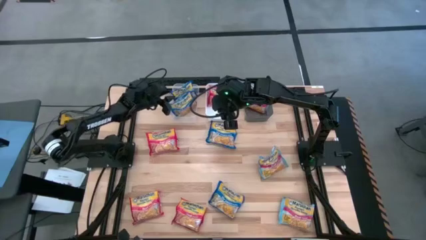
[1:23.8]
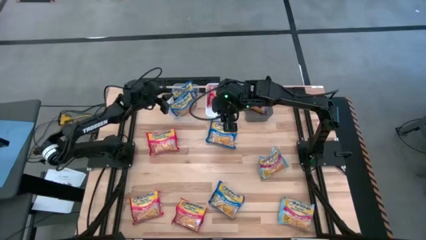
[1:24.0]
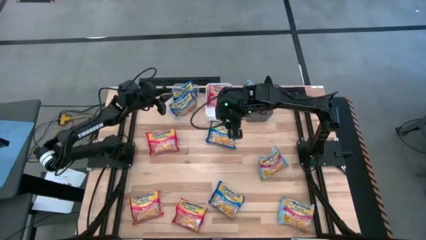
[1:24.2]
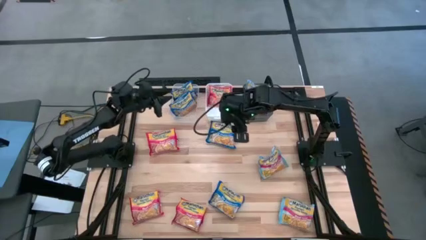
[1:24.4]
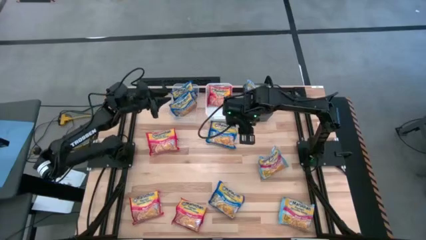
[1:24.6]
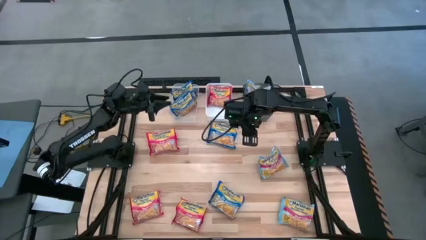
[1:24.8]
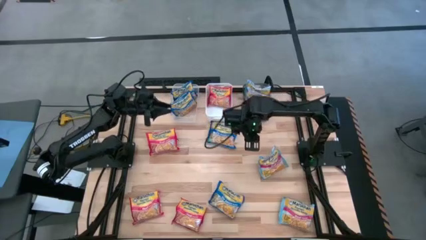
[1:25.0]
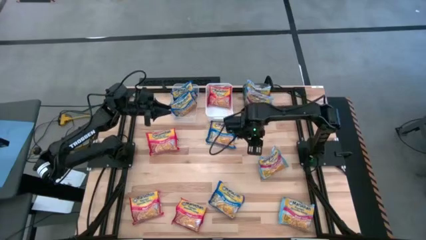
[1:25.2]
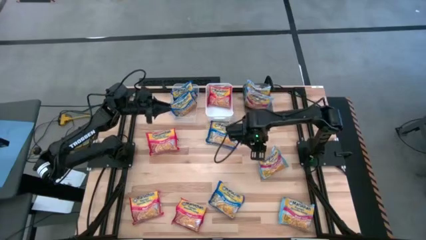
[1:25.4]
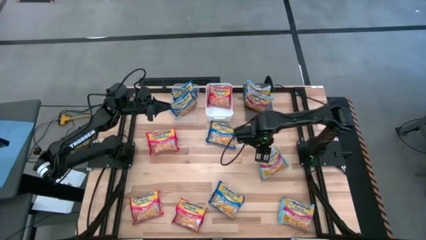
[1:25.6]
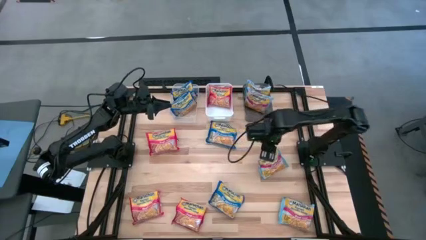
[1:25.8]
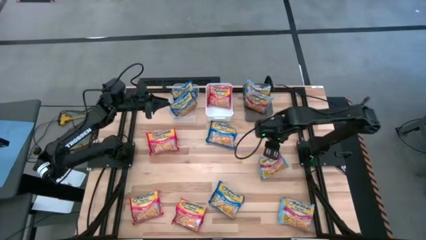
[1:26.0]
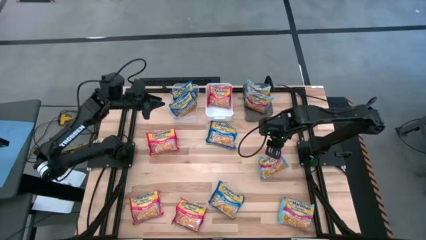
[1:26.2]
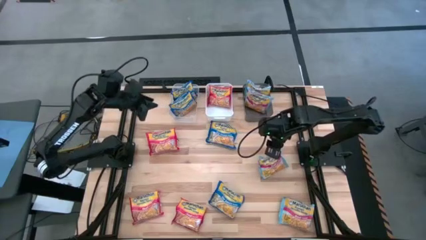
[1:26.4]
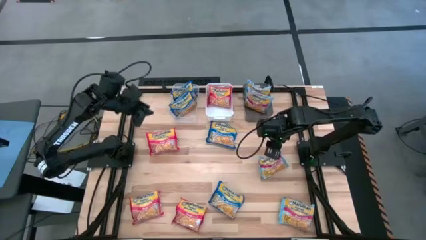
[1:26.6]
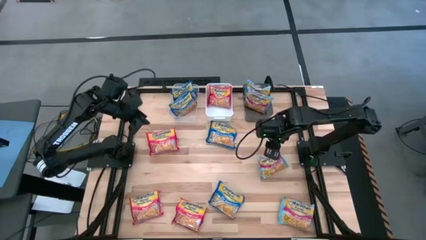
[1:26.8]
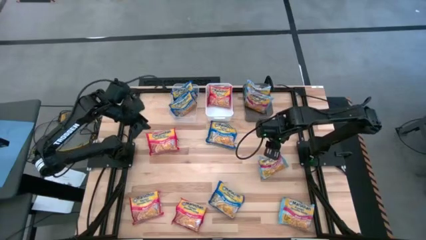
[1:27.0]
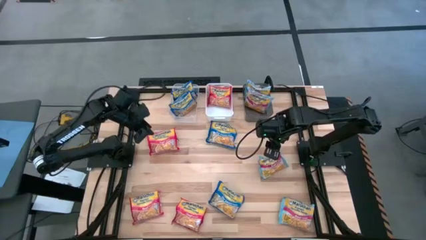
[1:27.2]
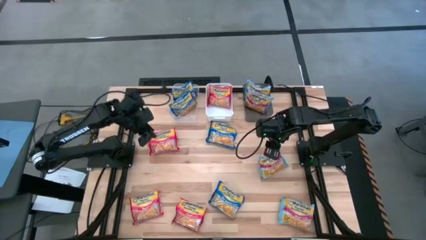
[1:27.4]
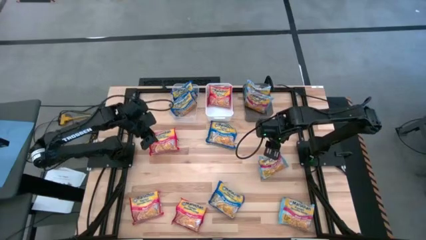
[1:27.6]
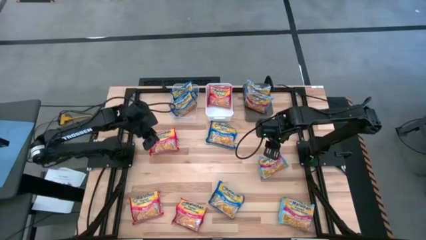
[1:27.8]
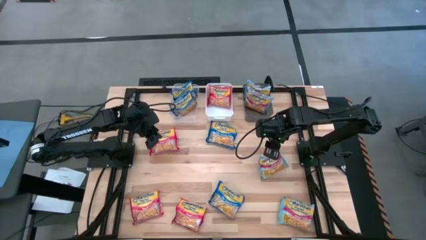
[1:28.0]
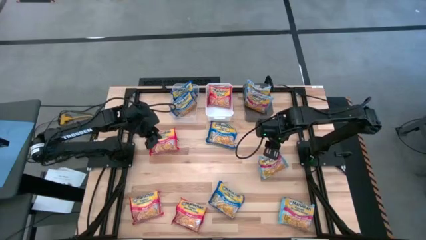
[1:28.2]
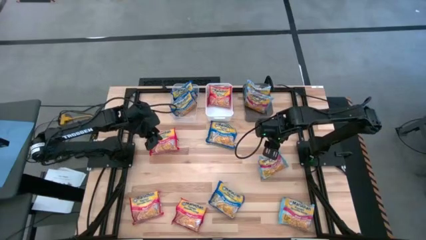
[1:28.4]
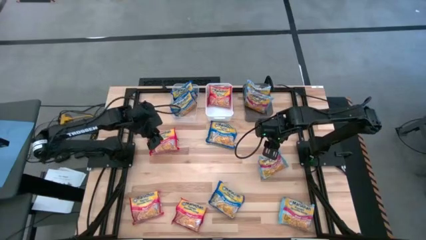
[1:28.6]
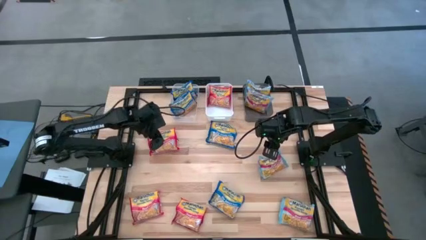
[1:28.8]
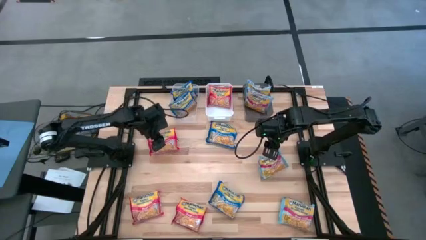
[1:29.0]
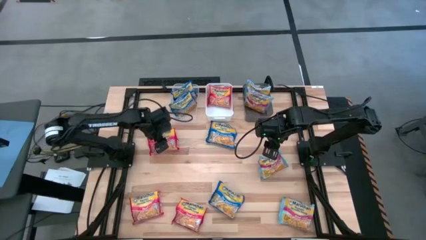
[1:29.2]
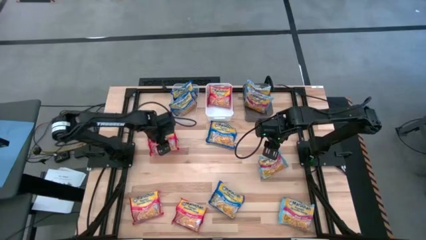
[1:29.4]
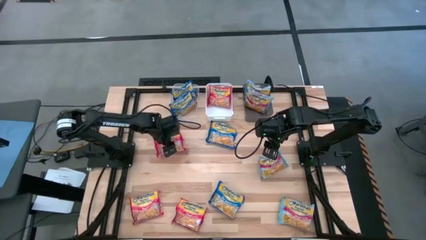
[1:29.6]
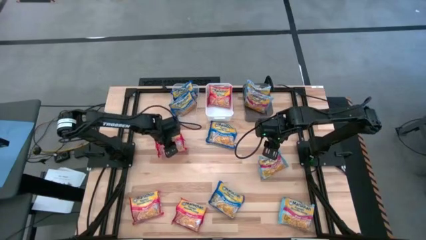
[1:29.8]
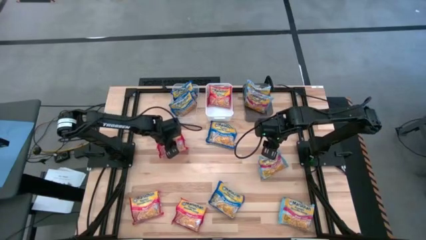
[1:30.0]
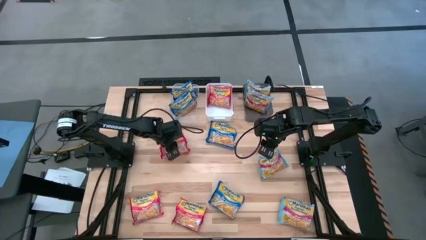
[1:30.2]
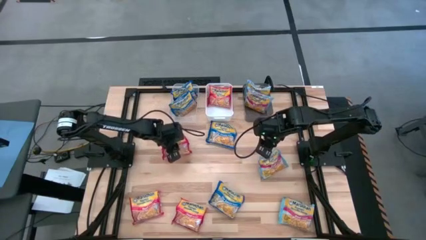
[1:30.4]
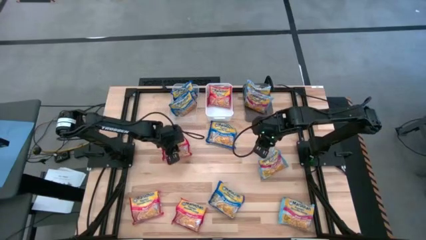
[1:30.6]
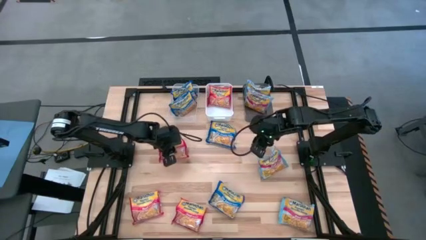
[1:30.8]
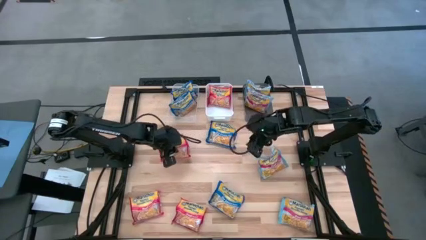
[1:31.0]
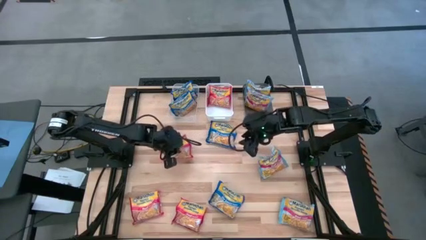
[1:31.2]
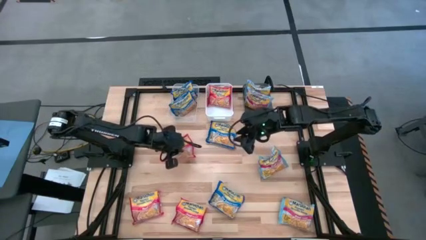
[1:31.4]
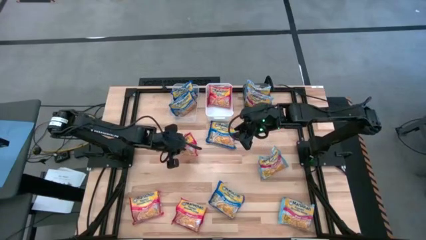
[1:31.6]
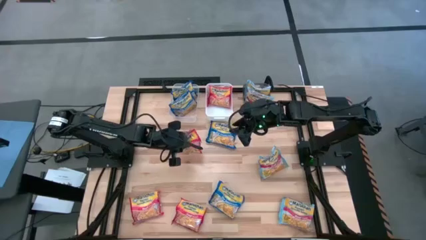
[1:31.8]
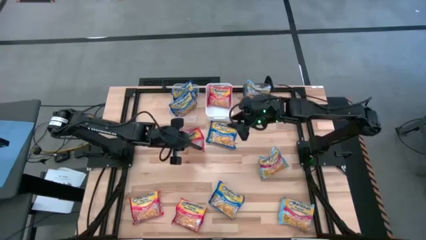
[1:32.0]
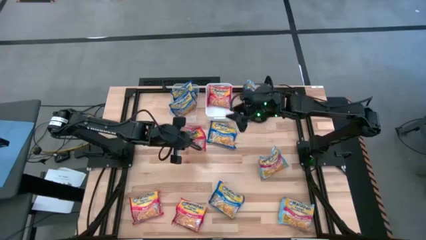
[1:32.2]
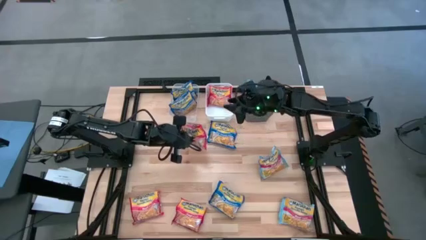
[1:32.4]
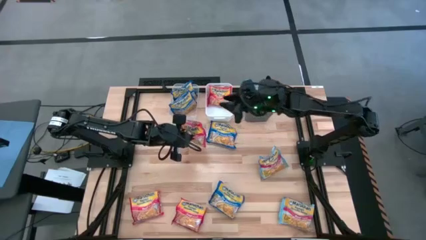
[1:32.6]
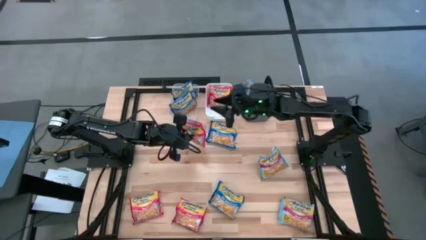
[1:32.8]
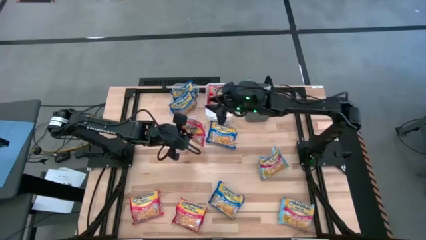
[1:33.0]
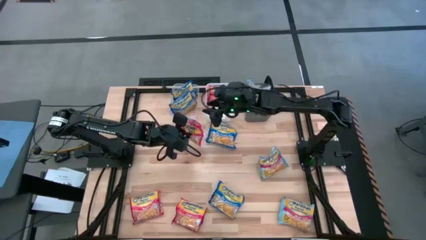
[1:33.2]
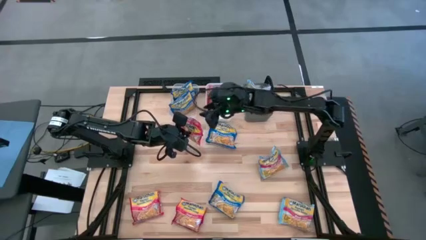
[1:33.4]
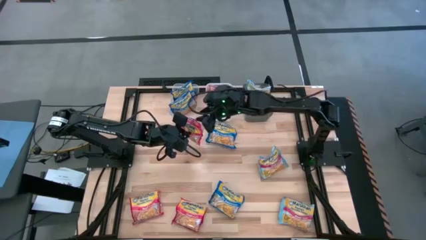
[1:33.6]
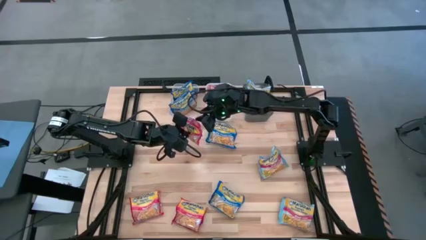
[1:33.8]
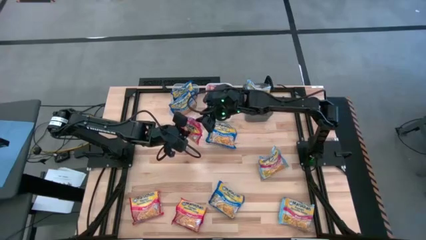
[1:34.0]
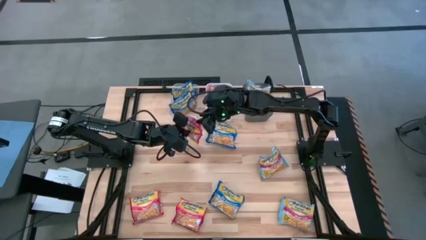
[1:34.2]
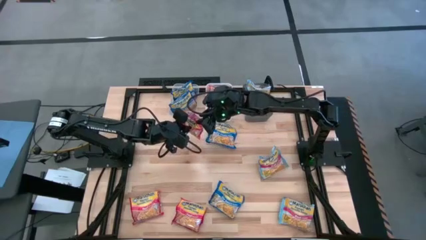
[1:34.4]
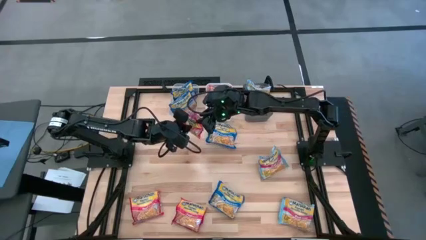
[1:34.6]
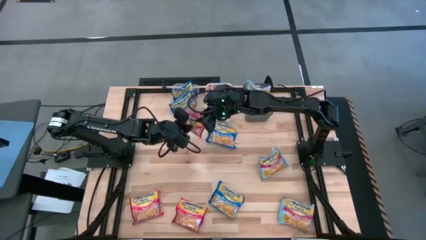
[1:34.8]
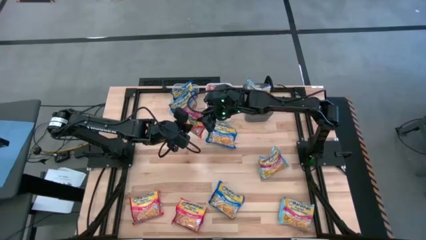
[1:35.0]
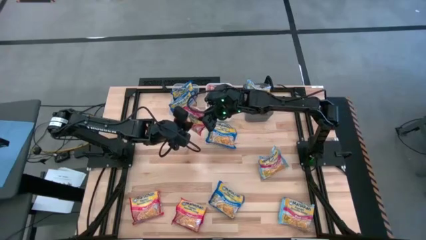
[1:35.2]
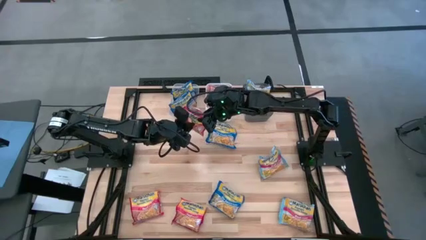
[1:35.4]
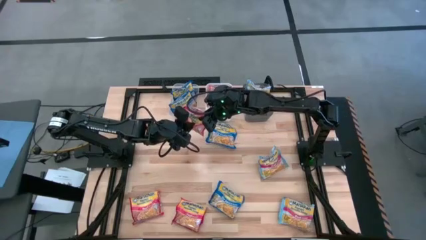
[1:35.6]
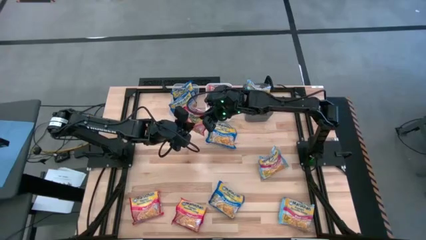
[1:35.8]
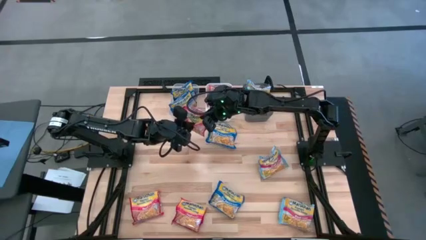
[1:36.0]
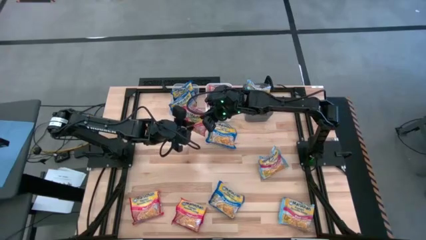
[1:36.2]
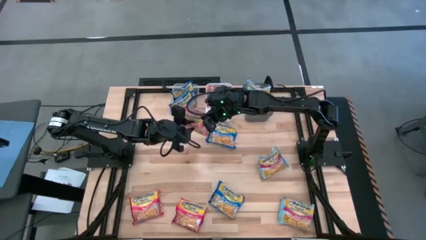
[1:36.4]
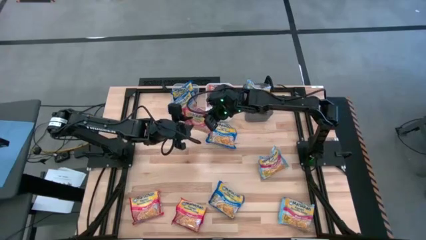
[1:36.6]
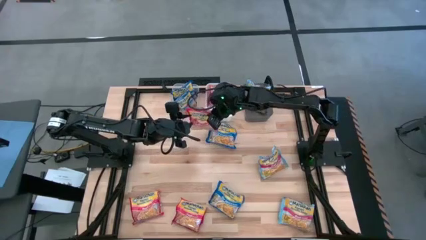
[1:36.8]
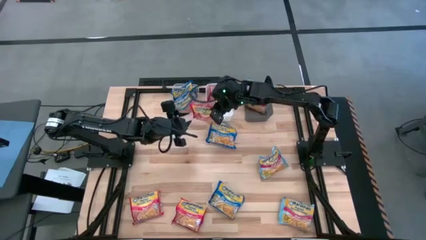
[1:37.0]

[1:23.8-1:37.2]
Task: Sort Maruchan noodles
Put the red noodle pack into the white bin

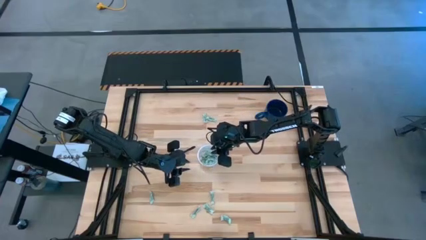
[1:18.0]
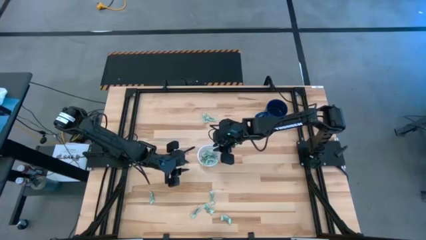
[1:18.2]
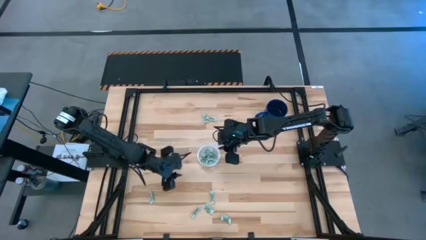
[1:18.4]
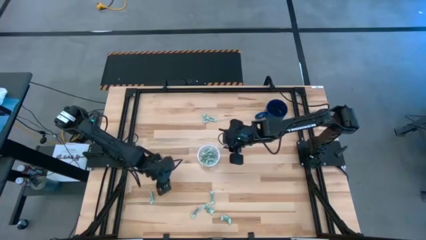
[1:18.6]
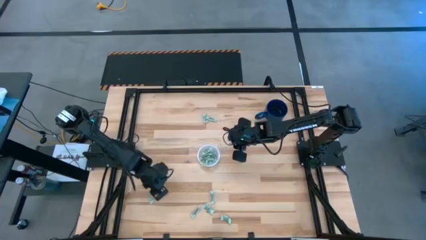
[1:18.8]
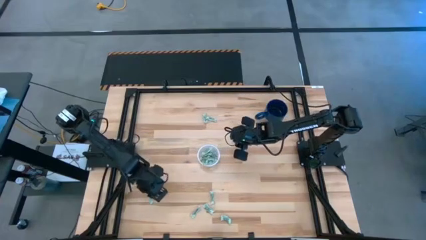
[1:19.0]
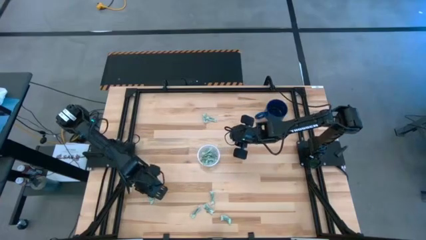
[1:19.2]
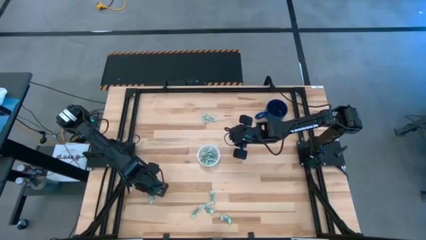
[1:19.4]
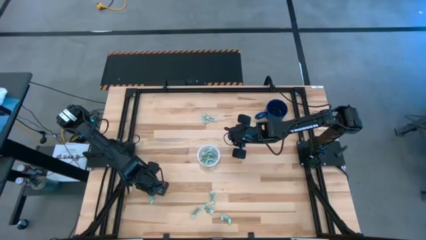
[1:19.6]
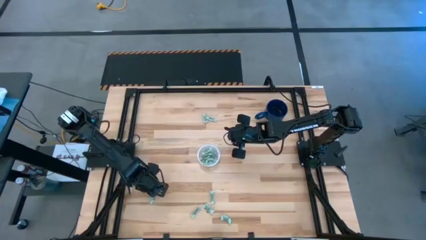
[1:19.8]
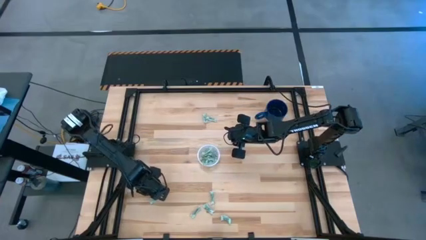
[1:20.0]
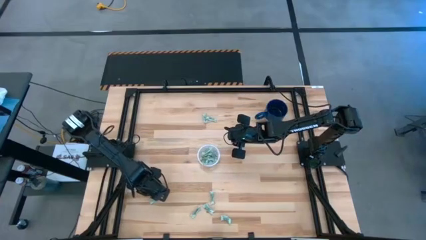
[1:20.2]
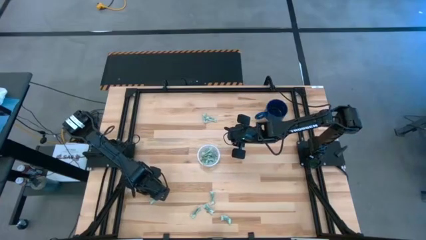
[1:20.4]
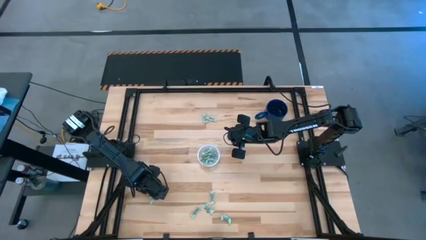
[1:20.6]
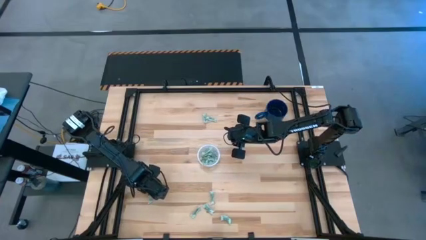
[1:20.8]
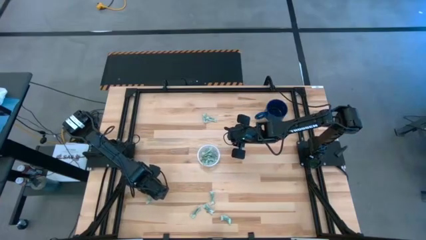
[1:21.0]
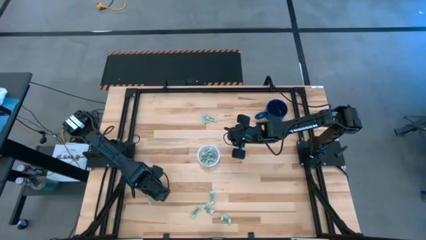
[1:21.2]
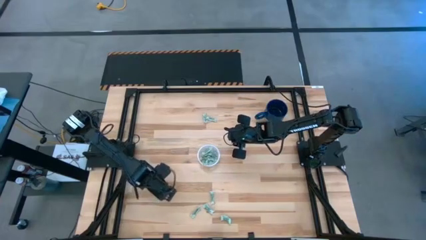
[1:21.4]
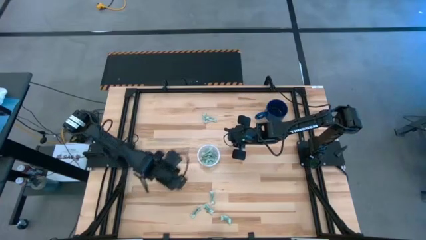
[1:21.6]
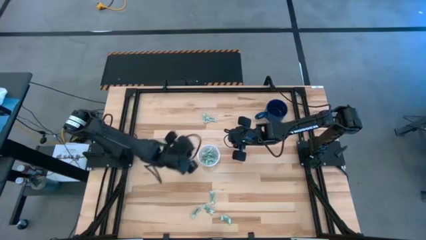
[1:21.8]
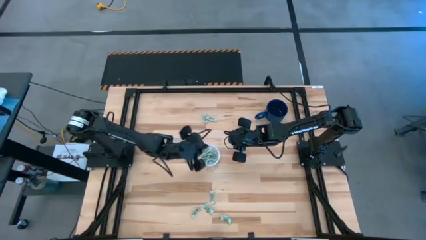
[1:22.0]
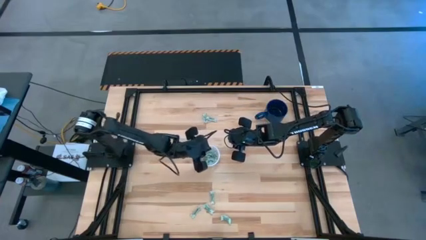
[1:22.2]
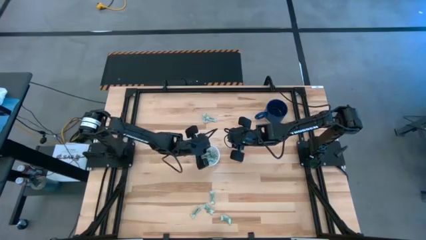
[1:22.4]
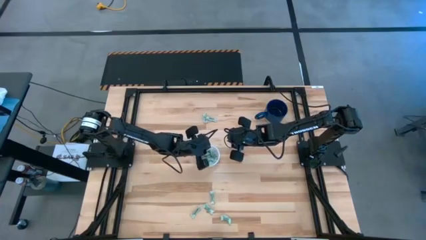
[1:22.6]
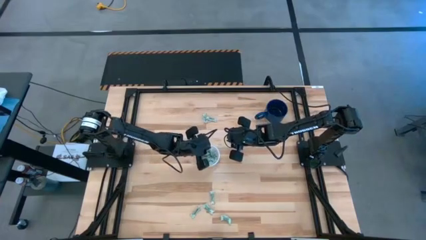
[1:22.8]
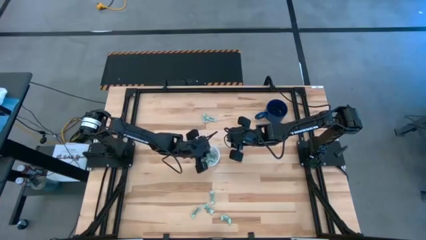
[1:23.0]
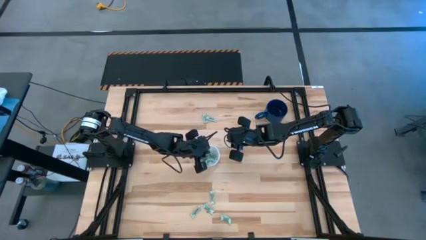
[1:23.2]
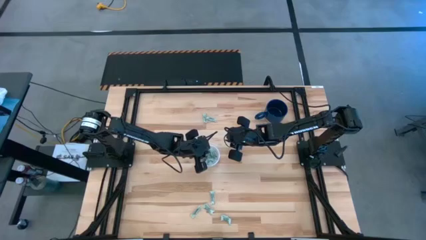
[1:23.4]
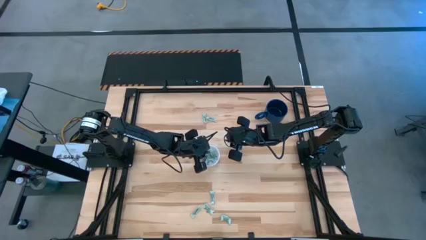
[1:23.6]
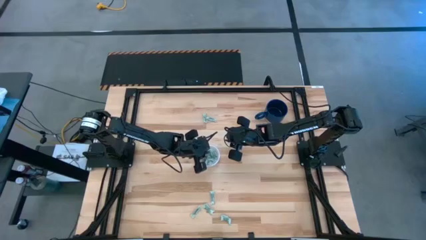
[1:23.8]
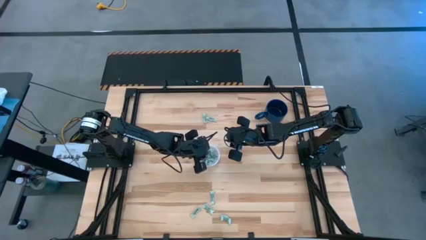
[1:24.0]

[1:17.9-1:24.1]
Task: Pick and place items into bin
Put the stevia packet into the transparent bin
